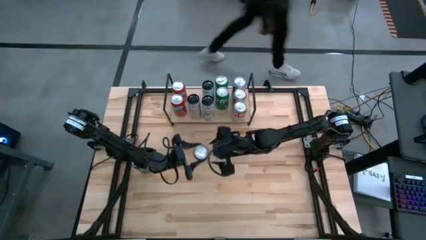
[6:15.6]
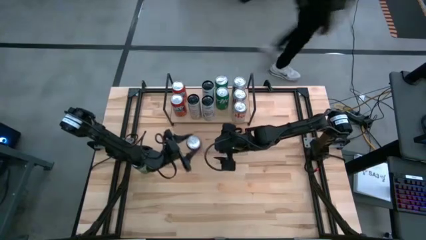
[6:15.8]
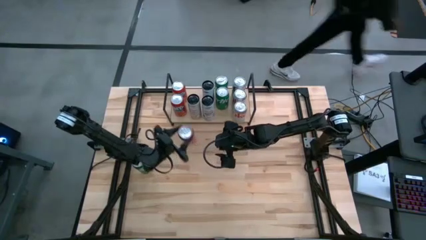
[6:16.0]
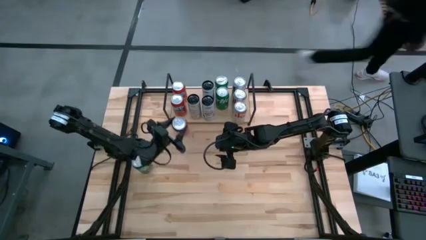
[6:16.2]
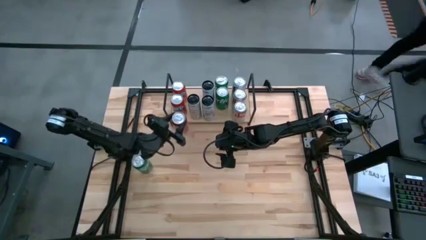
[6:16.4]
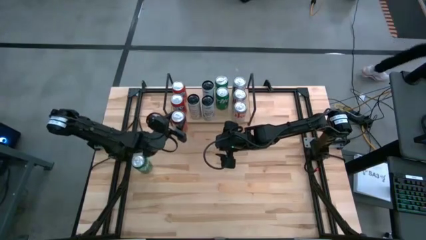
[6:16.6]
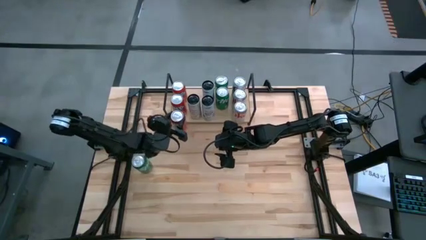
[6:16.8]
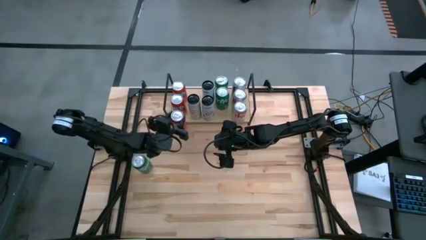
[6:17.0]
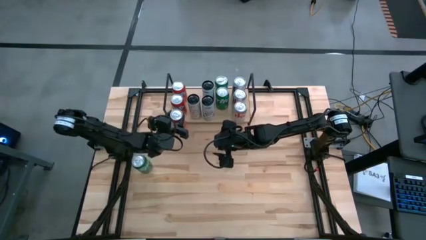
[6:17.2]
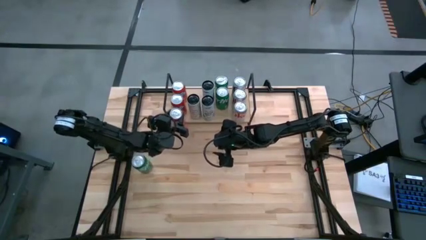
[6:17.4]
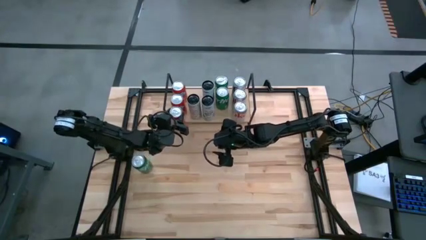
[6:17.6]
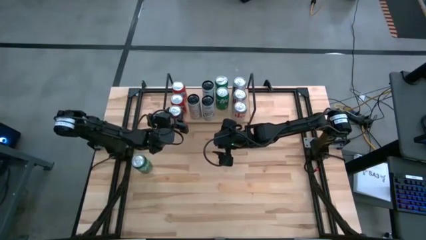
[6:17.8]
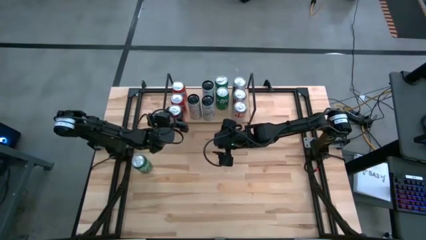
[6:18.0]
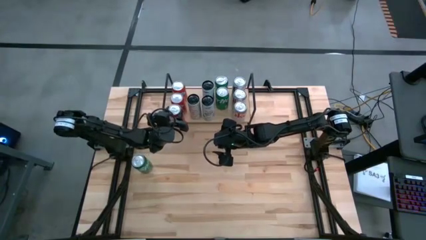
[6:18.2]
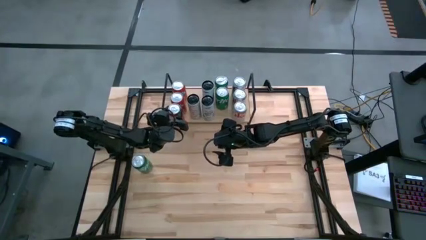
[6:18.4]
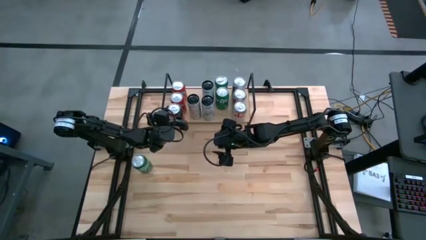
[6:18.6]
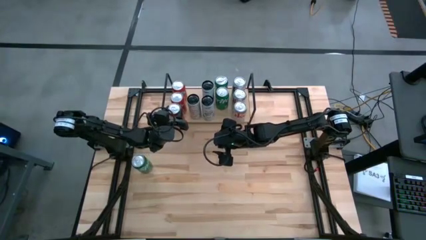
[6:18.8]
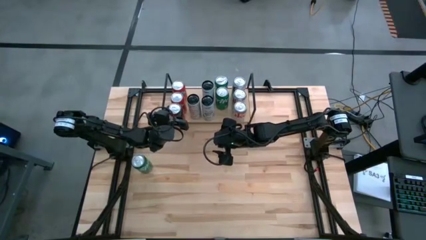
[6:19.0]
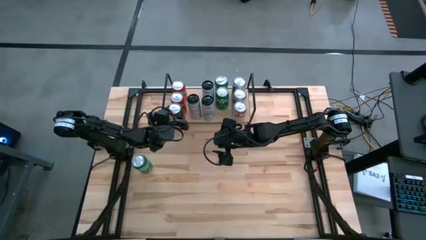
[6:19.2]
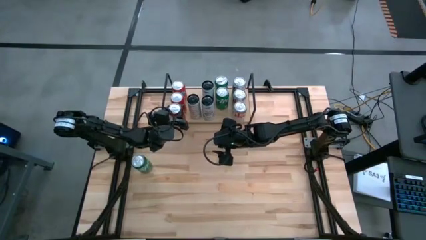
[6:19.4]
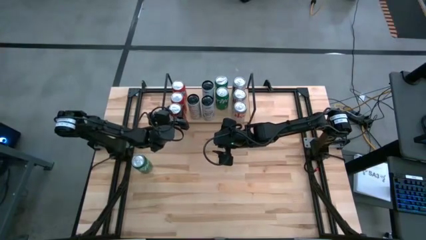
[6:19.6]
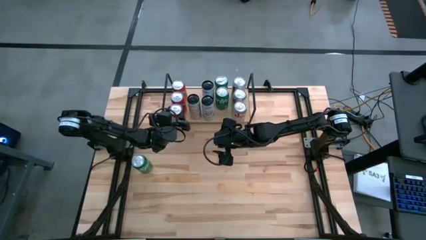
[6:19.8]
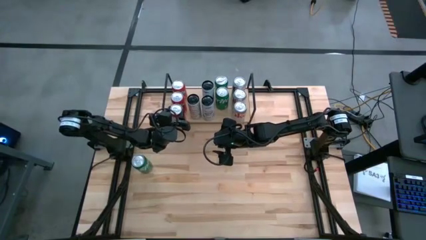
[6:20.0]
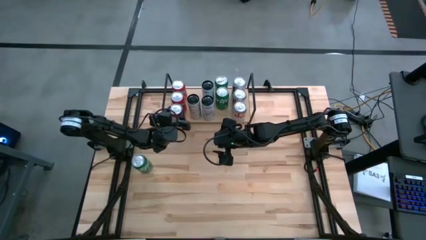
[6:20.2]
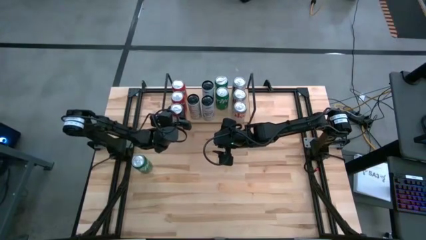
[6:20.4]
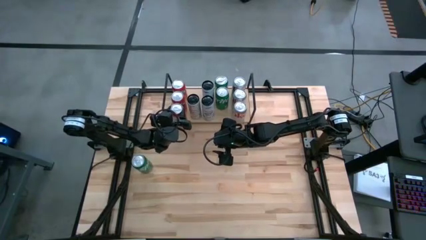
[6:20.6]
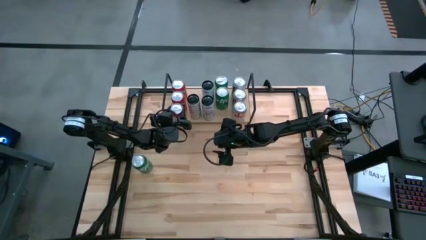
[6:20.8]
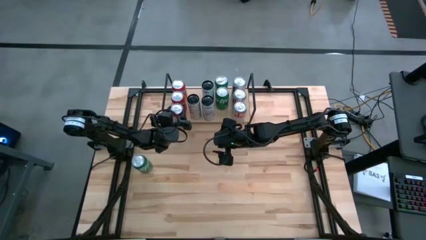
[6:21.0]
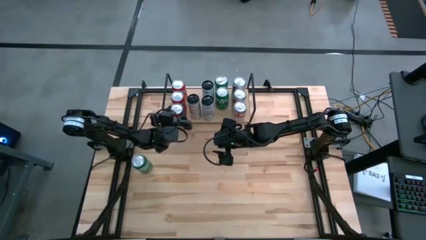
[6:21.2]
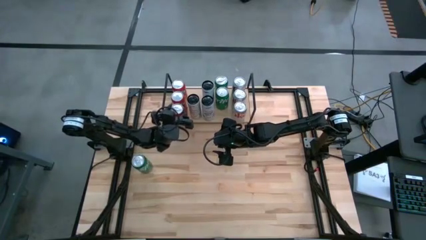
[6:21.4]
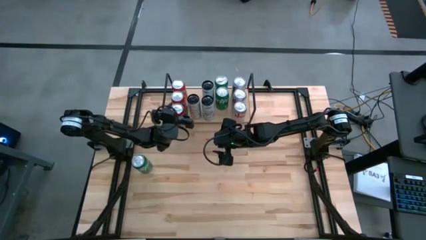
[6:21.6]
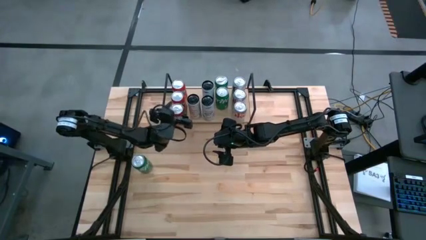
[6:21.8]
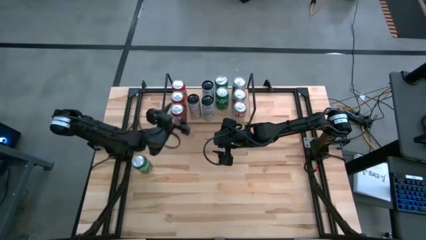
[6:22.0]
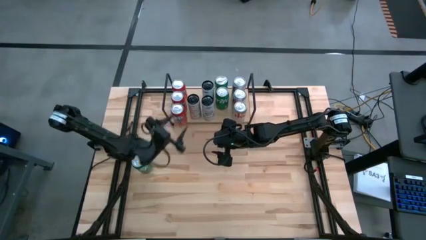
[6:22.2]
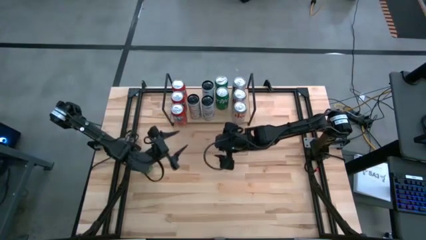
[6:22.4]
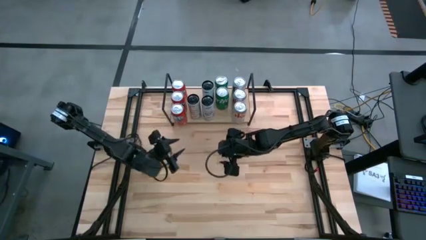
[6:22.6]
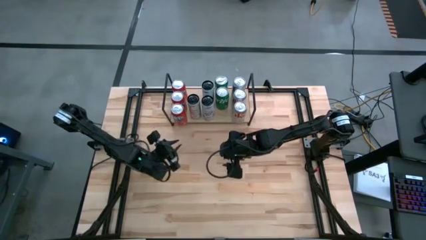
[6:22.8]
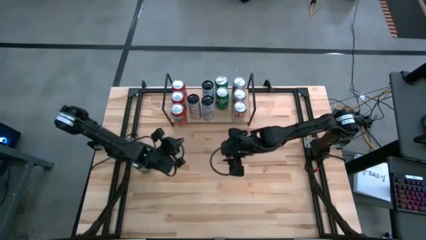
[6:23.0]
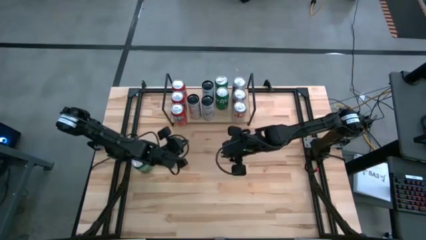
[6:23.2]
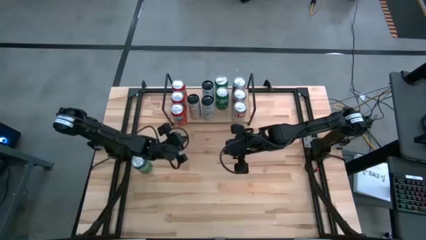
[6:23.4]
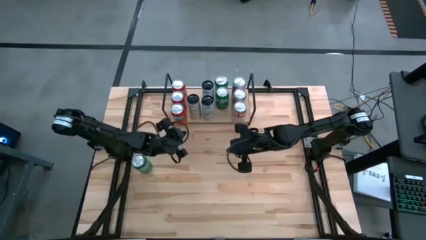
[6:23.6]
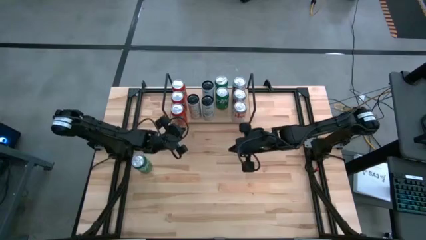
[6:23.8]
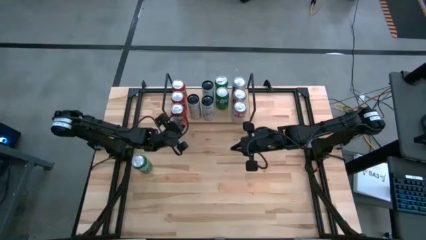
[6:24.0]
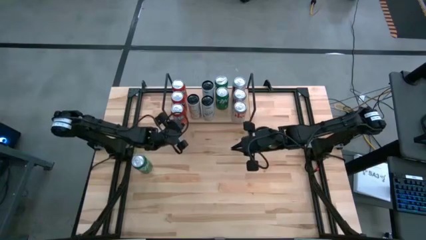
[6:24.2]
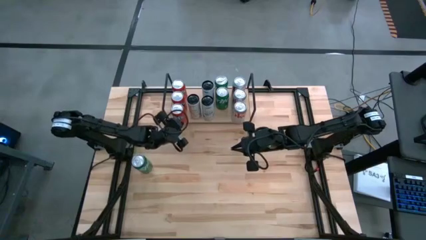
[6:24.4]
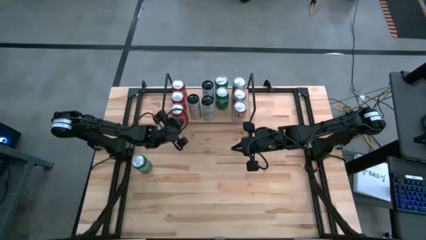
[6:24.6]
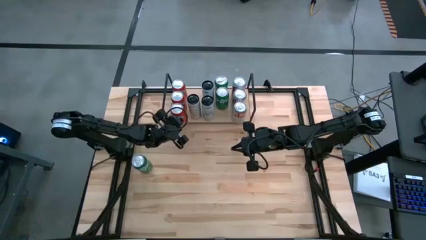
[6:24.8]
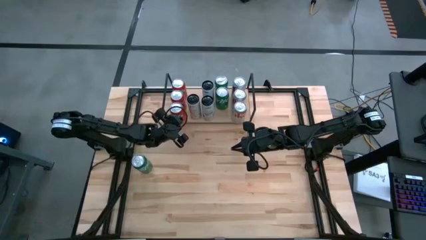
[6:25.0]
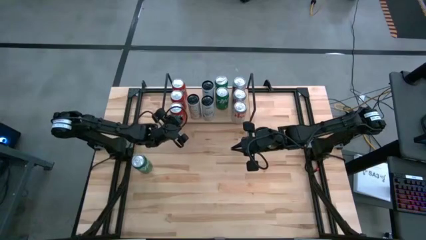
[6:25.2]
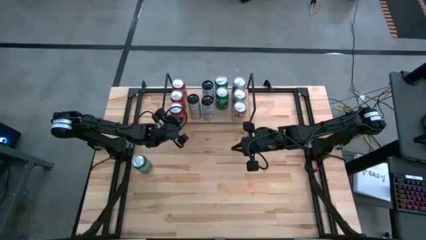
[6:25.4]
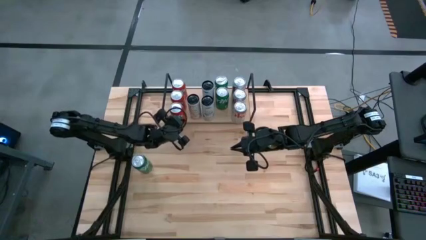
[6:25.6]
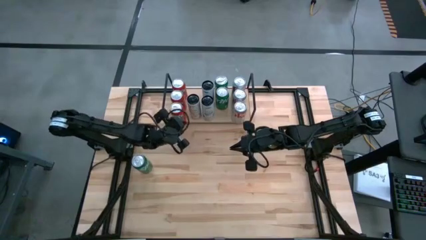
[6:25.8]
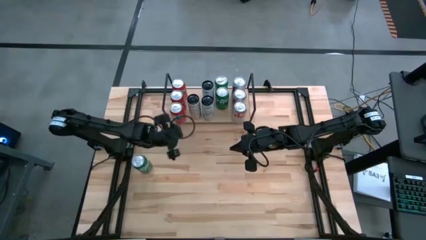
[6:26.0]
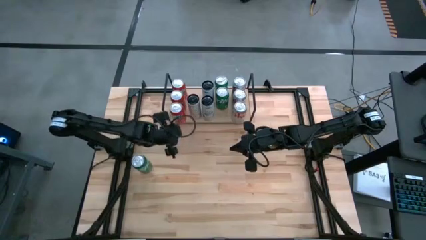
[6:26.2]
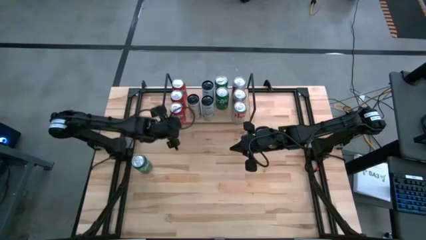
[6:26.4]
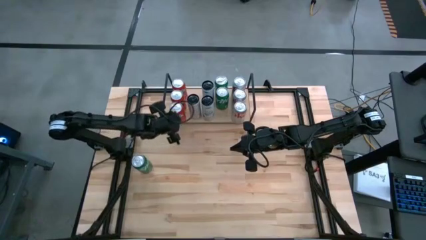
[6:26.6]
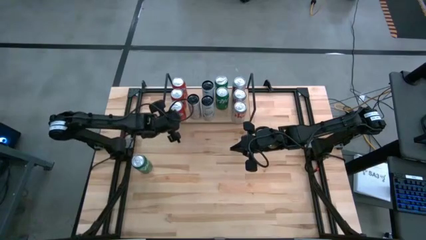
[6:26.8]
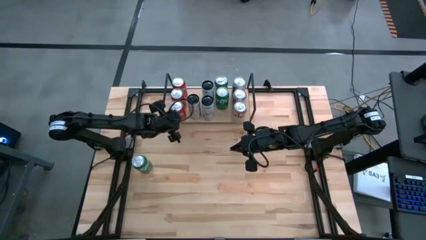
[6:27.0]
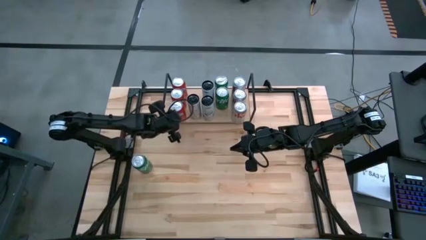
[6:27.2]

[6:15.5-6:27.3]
Task: Sort soda cans
Put the red soda can on the shelf and align it with the other red soda cans
